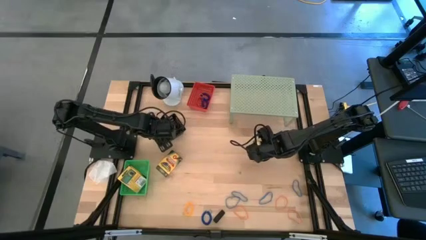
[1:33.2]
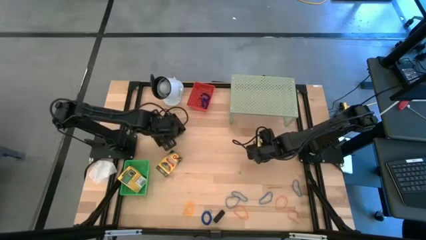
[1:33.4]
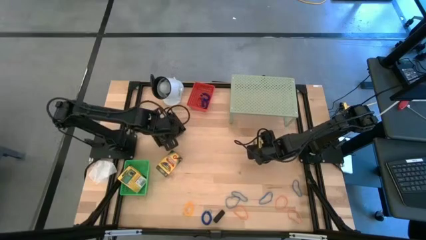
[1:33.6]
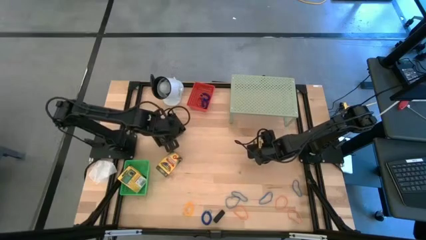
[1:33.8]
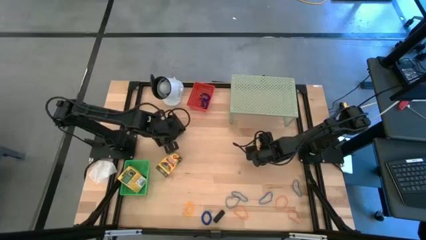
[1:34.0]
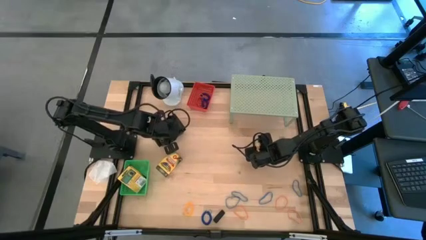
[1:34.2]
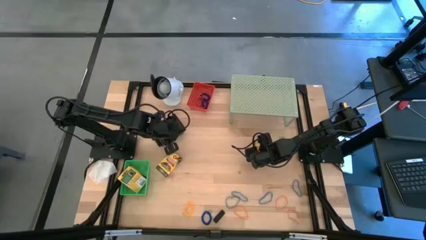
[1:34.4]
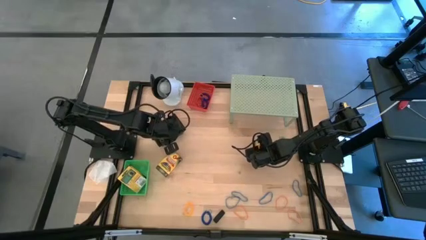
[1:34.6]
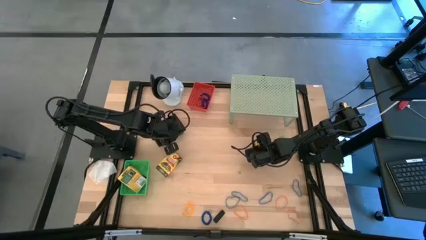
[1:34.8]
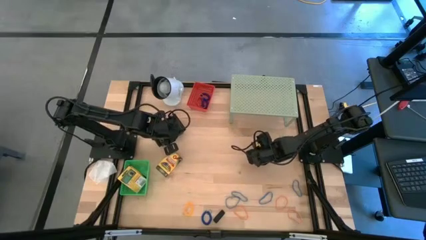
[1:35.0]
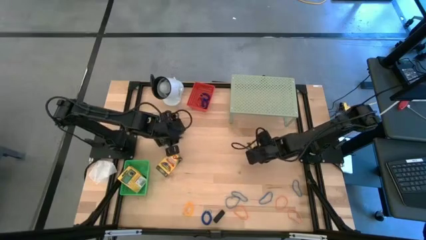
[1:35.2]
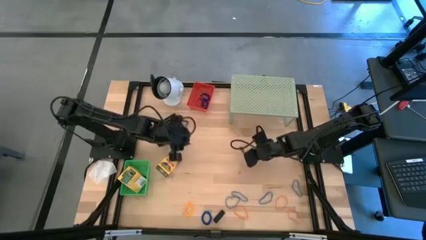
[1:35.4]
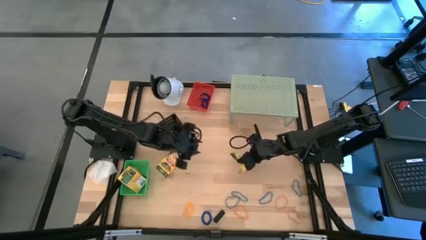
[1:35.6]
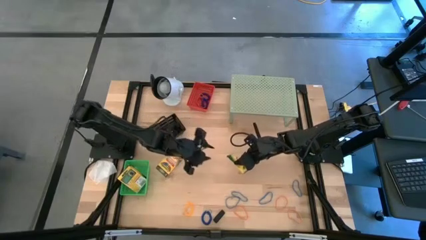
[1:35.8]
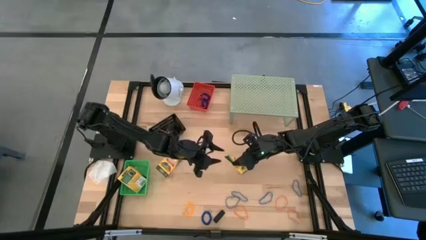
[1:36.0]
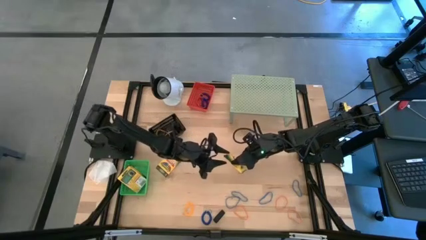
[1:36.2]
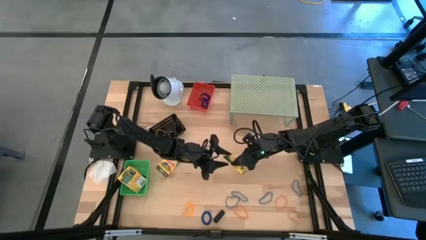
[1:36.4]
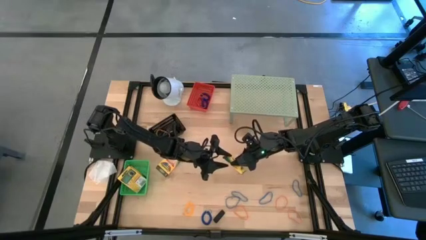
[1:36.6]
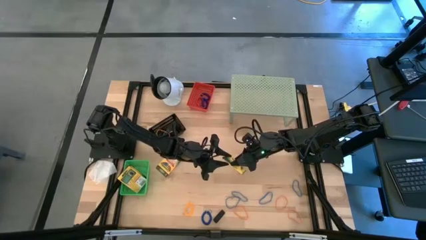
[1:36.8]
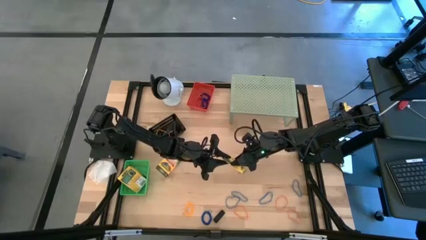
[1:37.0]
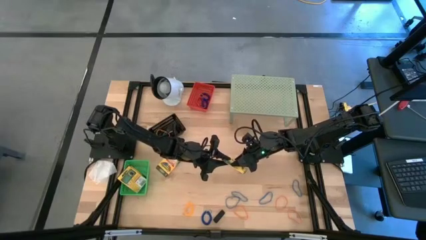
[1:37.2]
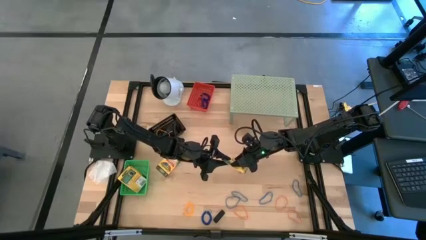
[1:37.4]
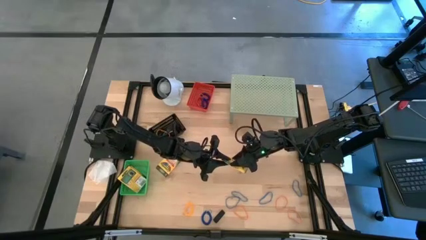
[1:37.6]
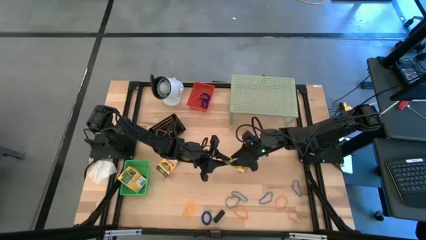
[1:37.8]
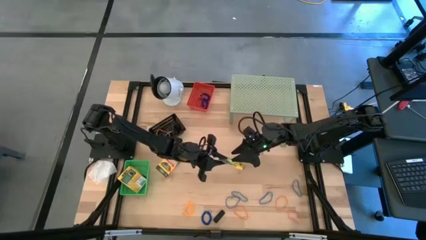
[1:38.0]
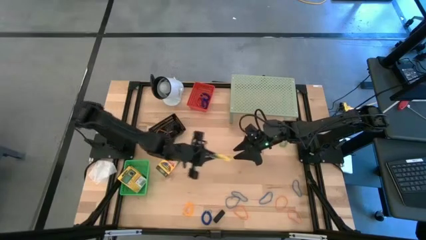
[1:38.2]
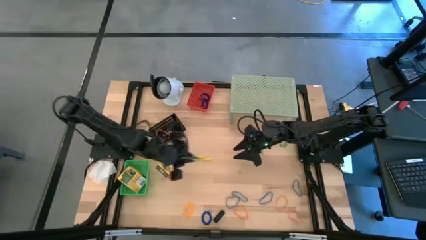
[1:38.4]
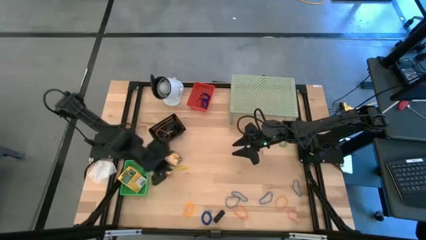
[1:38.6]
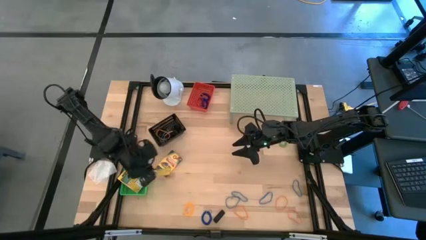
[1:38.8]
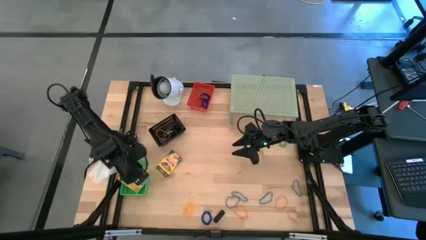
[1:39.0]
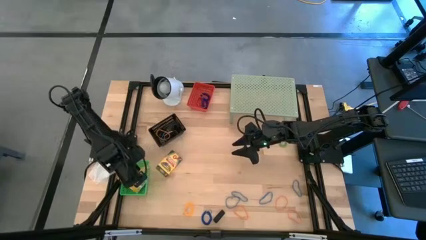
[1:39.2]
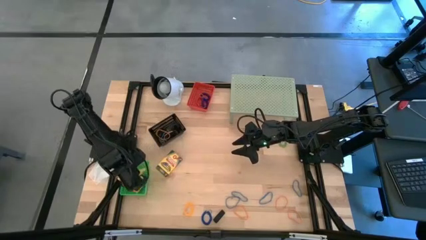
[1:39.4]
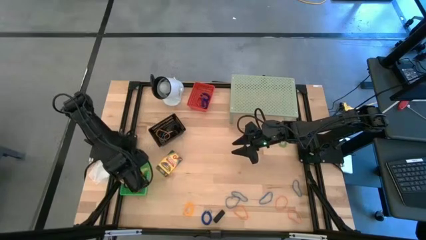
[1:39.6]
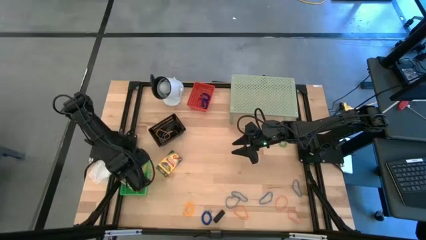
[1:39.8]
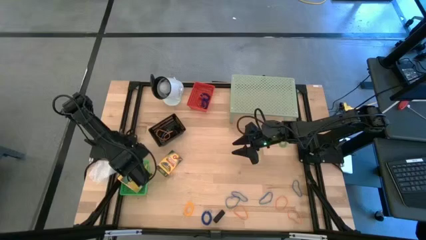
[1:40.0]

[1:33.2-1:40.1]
Task: Pick & Place Office Desk Supplies
Put the crayons box into the green bin

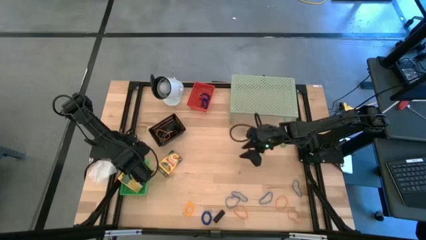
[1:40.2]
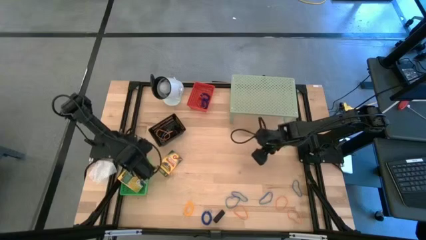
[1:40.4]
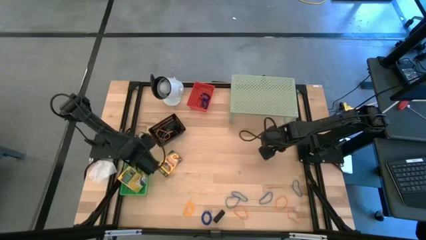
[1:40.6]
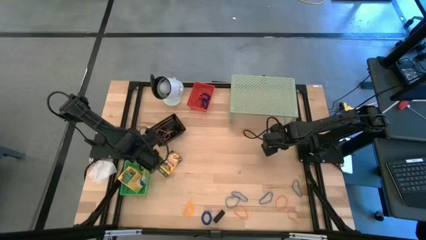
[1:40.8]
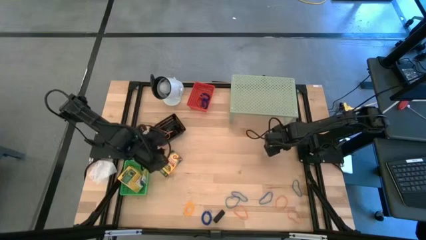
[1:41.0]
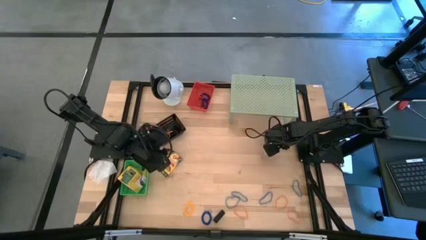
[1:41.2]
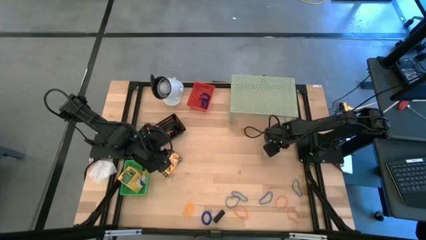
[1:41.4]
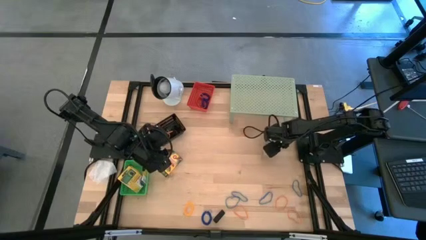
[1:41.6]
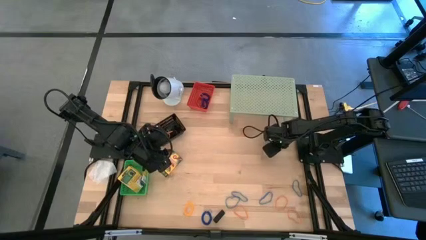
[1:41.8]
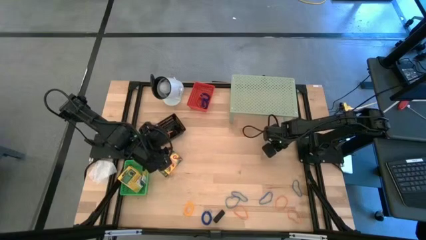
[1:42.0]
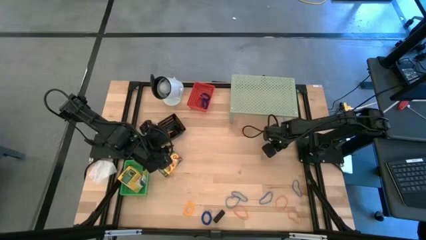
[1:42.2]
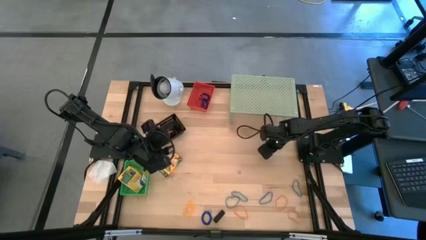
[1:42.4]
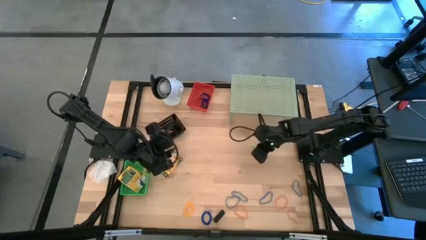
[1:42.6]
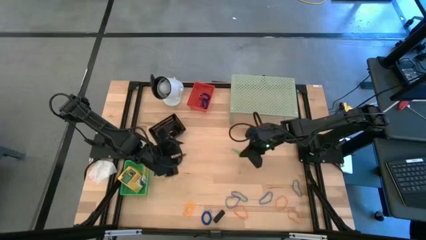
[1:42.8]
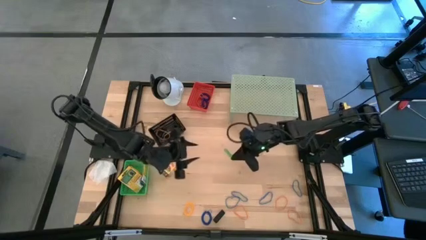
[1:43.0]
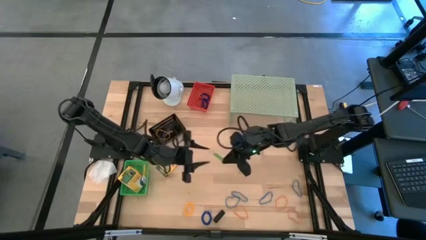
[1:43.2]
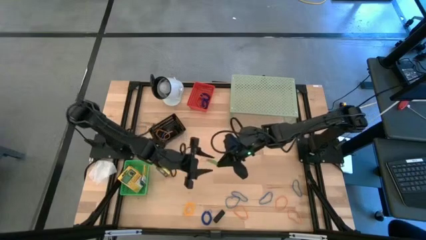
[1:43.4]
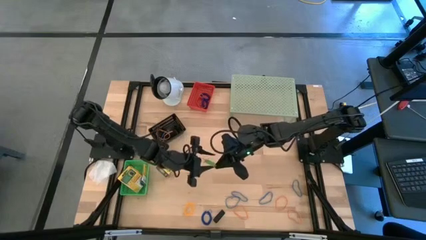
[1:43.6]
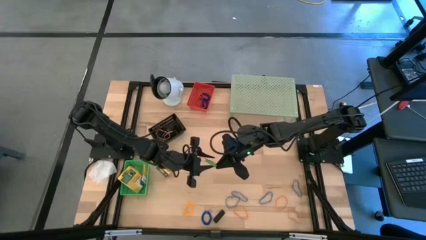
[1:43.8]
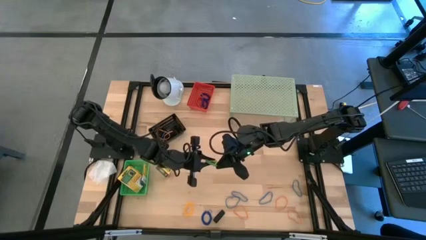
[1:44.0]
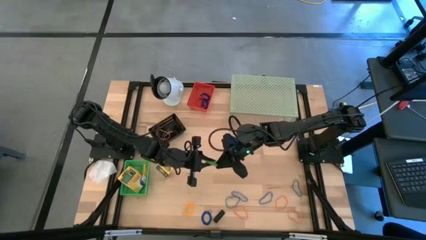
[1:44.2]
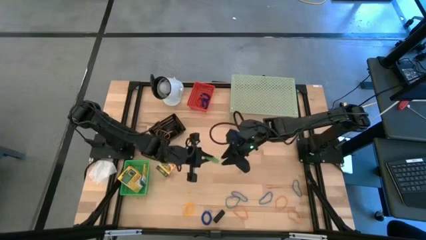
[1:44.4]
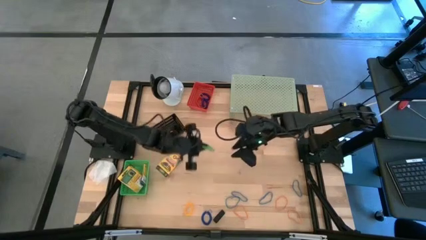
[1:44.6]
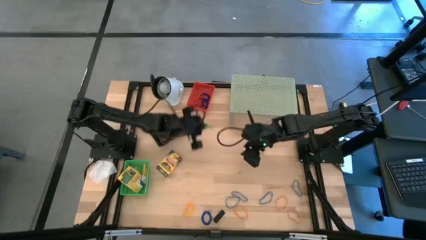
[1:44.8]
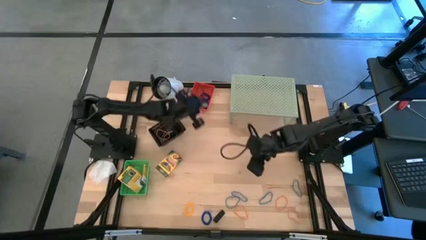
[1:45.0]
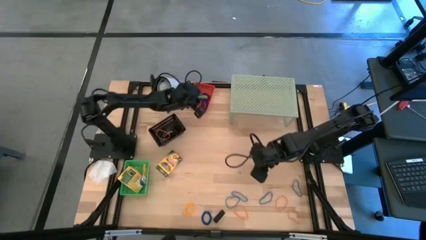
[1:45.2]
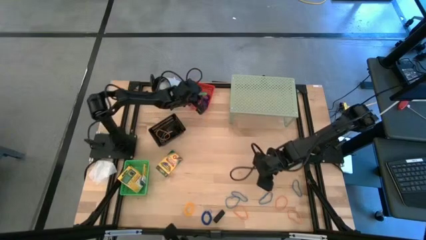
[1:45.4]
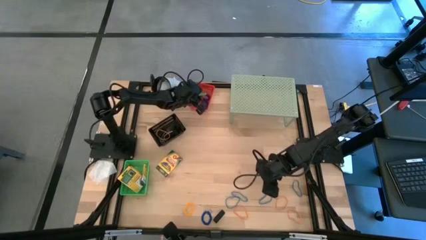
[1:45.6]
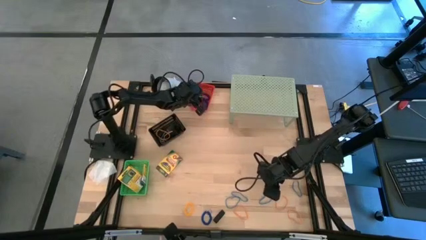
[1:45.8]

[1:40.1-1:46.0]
Put the green spring keychain into the red bin

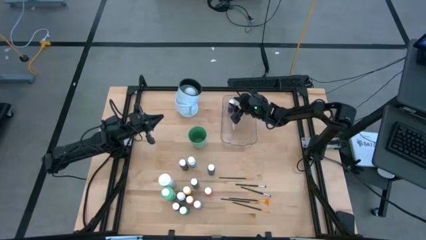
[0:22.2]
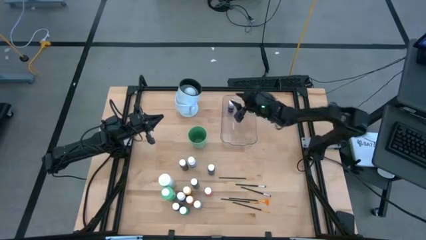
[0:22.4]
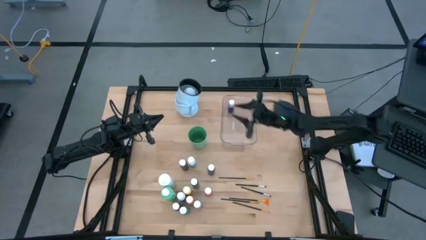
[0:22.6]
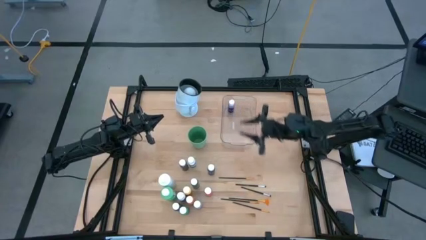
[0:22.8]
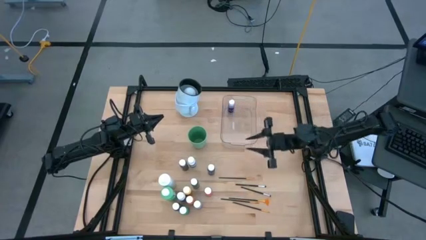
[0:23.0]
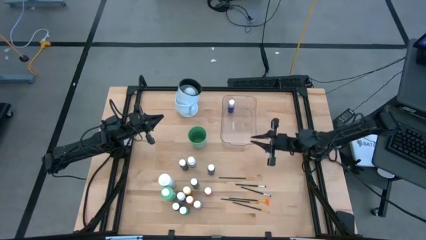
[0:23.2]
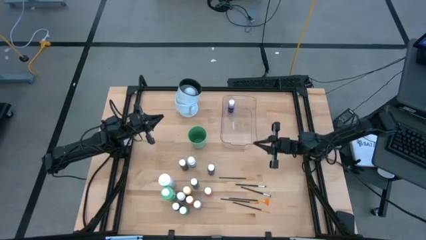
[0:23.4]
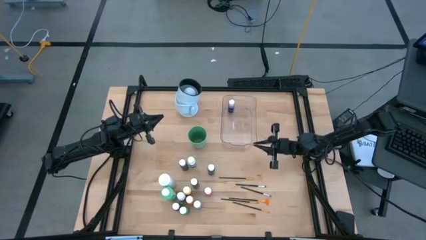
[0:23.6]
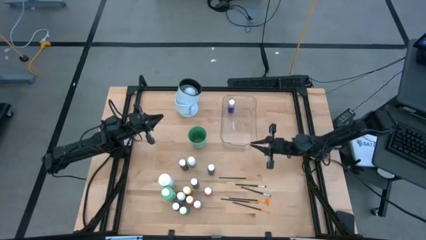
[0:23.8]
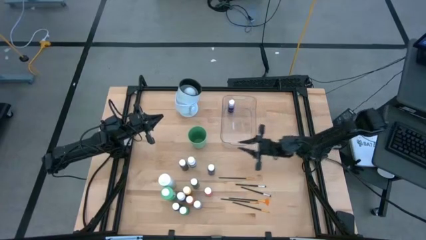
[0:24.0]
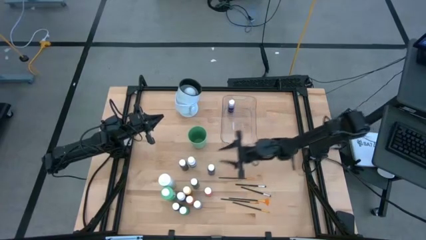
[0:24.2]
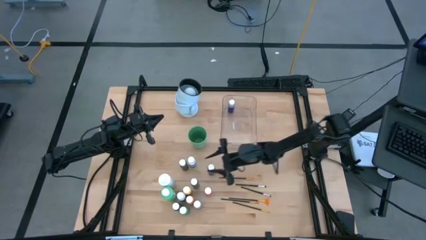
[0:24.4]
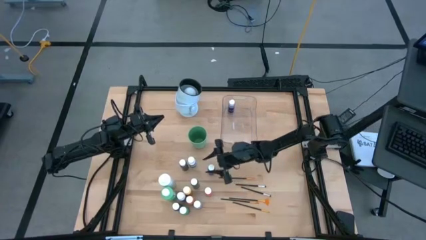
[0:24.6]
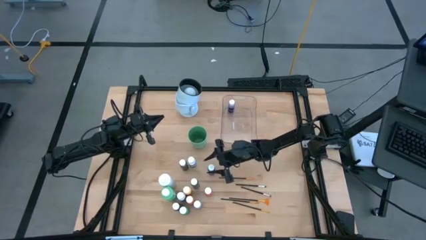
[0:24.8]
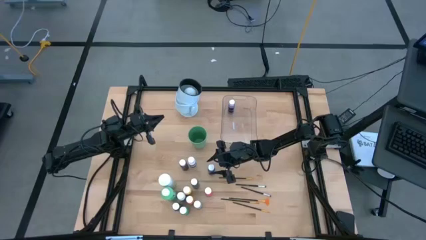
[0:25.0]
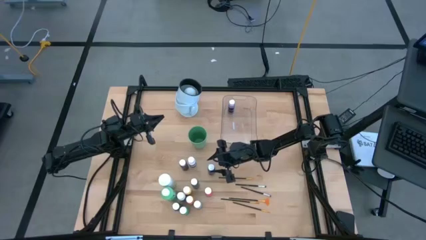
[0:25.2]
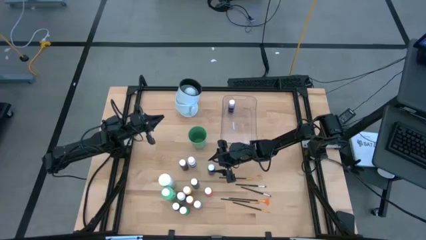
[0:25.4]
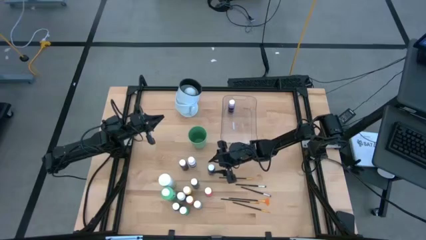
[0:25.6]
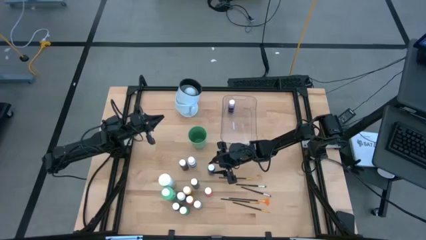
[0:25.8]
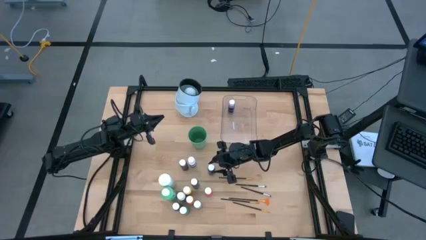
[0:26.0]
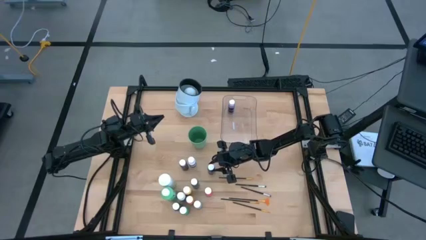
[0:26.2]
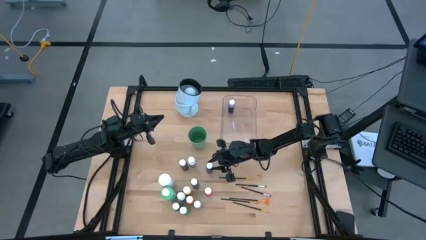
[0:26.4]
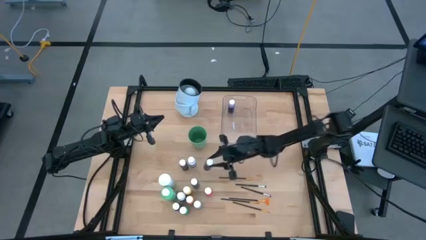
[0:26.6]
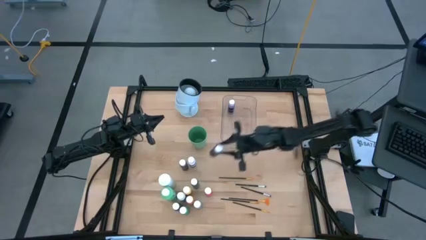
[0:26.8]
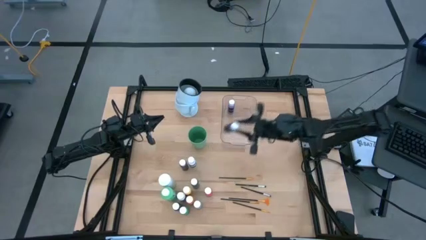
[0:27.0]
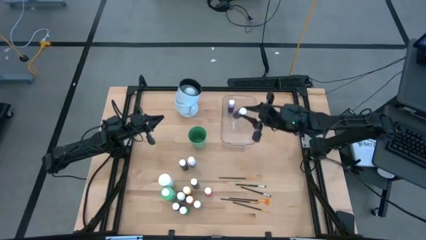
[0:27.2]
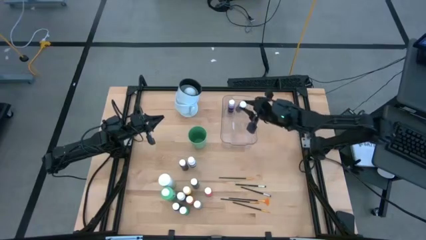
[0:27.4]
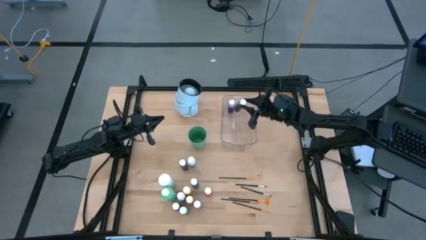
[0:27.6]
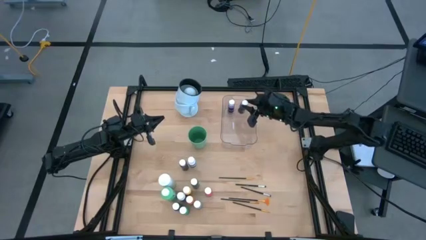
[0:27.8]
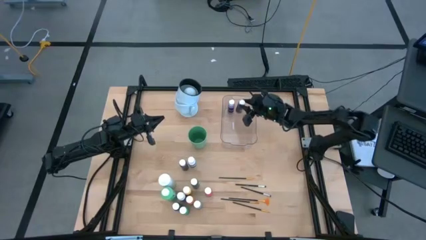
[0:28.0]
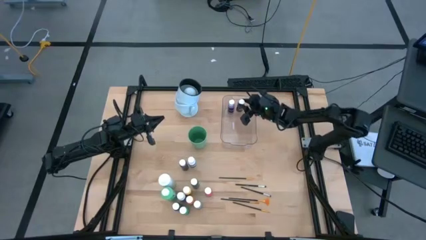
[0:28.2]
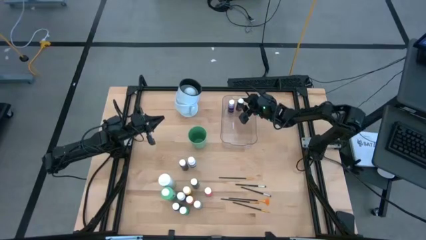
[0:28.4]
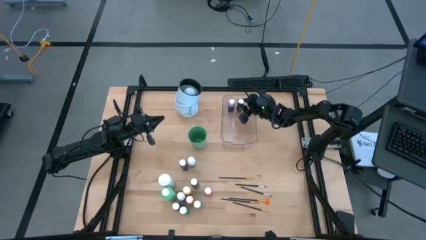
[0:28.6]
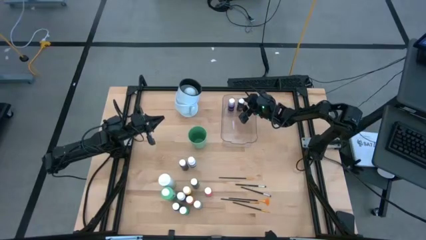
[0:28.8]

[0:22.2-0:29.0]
Task: Pick & Place Paint Supplies
Put the blue paint bottle into the transparent bin
